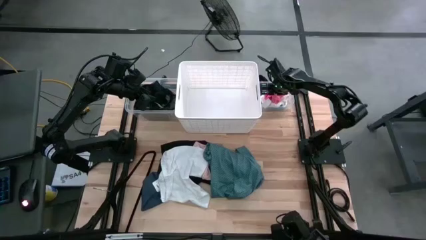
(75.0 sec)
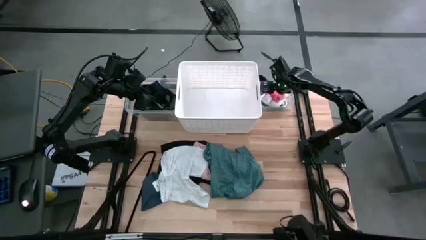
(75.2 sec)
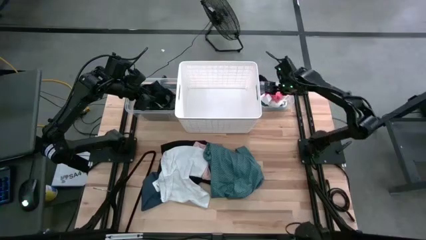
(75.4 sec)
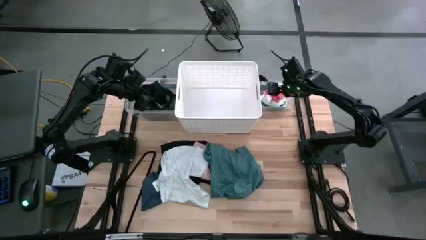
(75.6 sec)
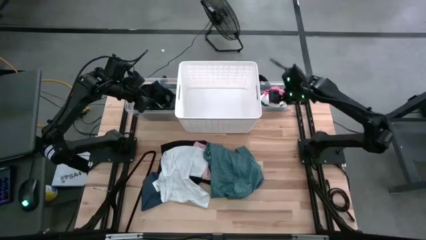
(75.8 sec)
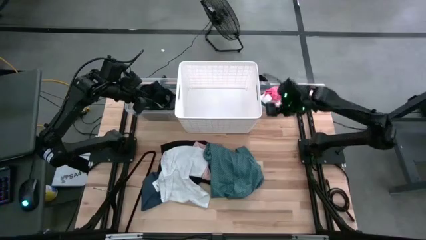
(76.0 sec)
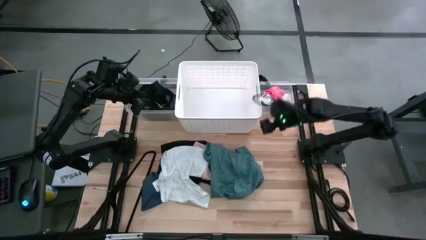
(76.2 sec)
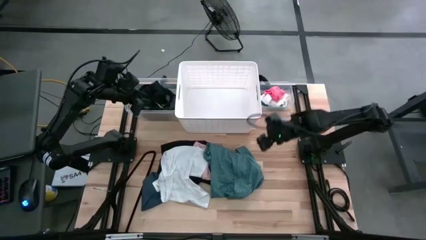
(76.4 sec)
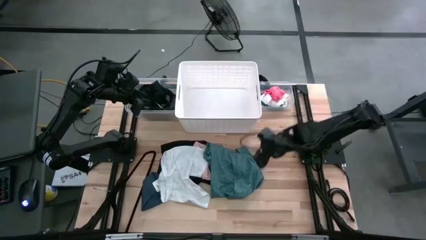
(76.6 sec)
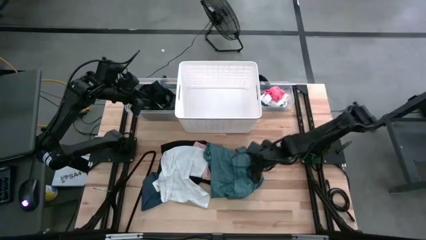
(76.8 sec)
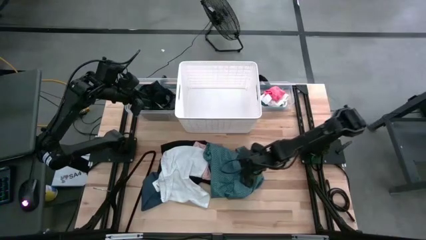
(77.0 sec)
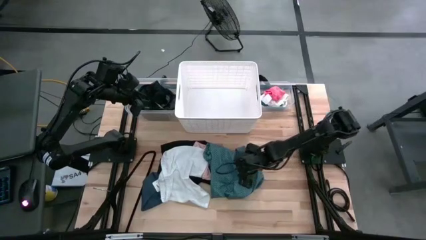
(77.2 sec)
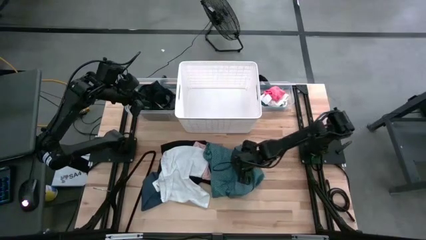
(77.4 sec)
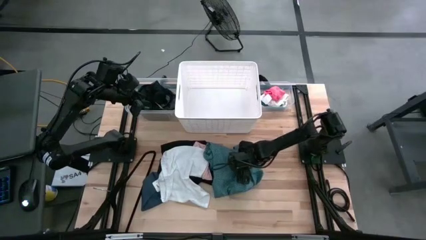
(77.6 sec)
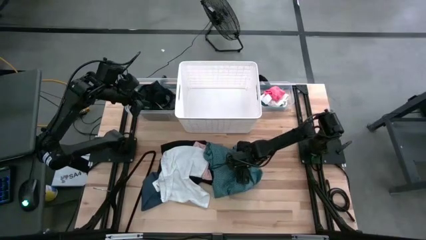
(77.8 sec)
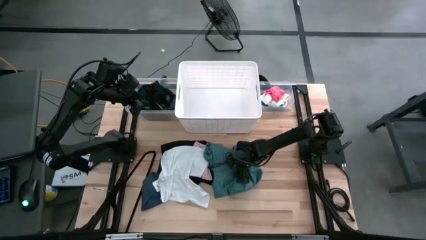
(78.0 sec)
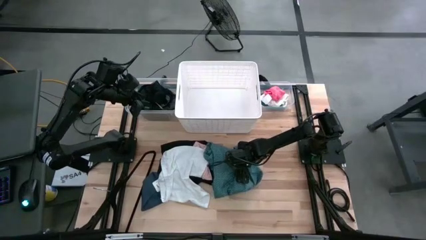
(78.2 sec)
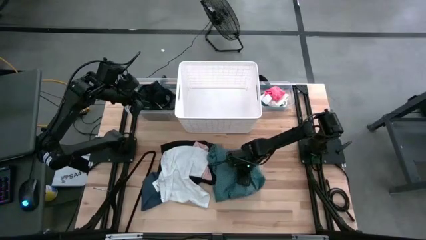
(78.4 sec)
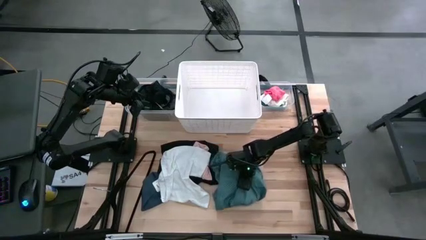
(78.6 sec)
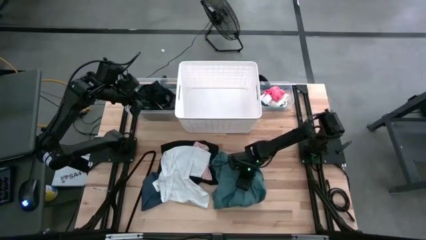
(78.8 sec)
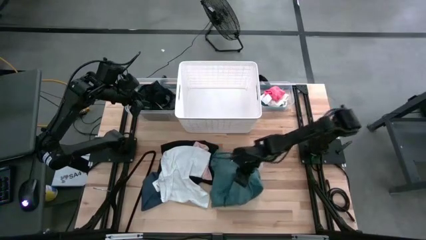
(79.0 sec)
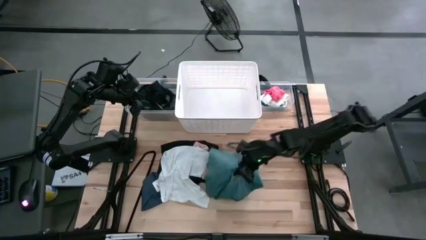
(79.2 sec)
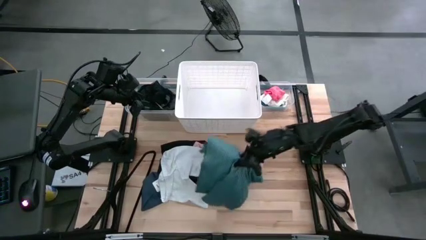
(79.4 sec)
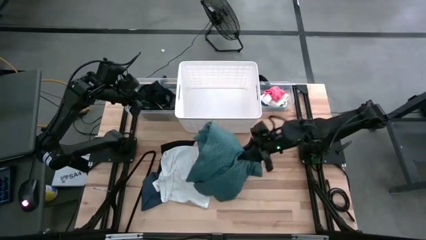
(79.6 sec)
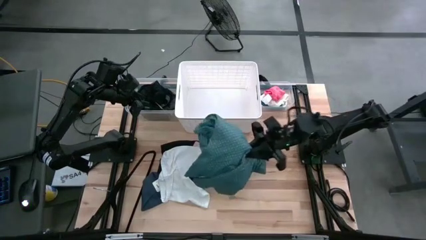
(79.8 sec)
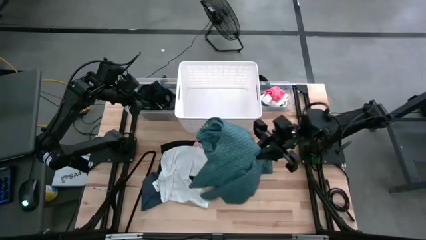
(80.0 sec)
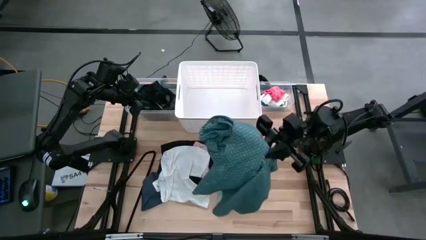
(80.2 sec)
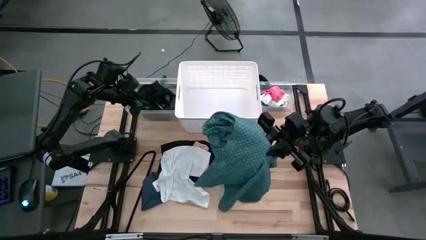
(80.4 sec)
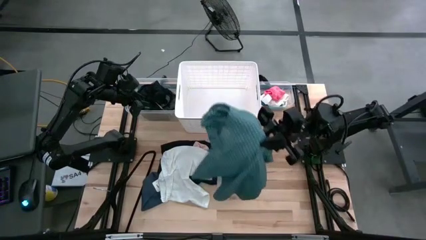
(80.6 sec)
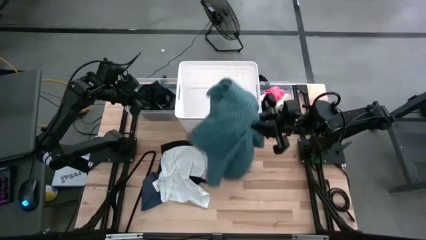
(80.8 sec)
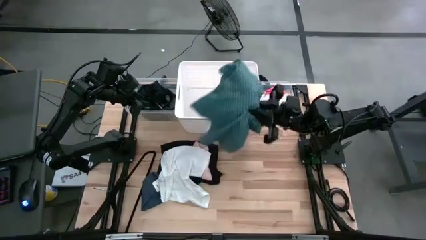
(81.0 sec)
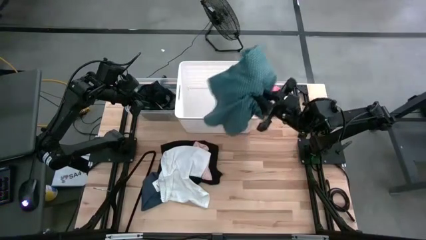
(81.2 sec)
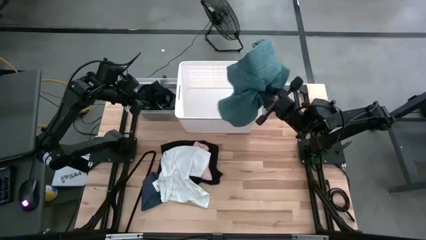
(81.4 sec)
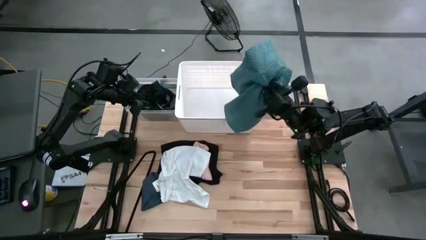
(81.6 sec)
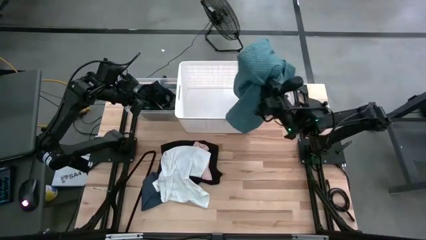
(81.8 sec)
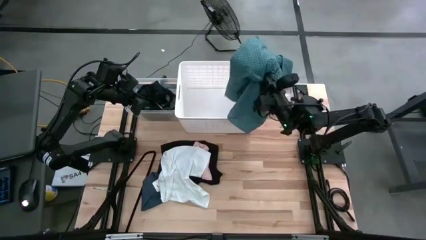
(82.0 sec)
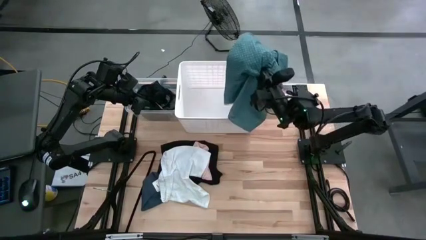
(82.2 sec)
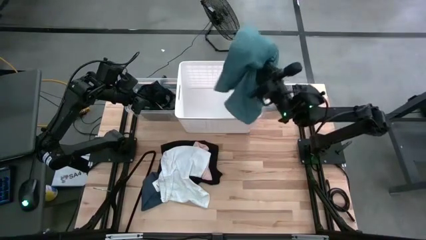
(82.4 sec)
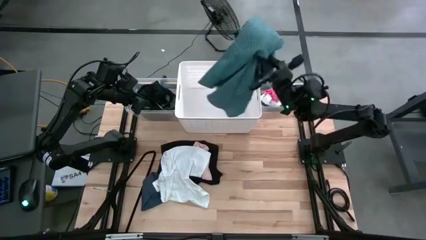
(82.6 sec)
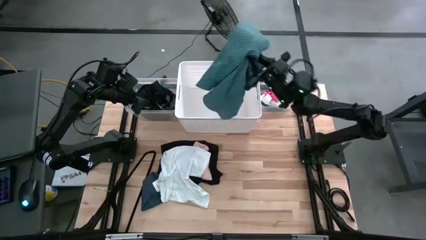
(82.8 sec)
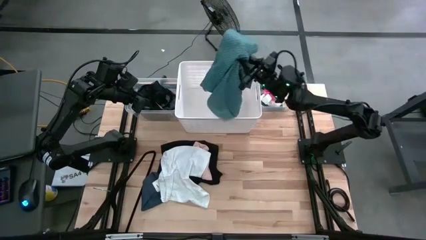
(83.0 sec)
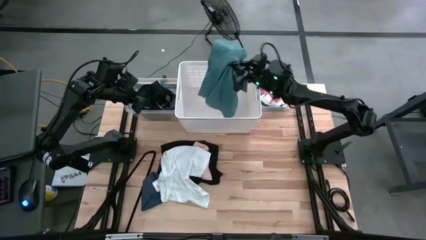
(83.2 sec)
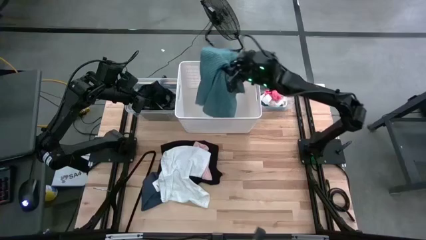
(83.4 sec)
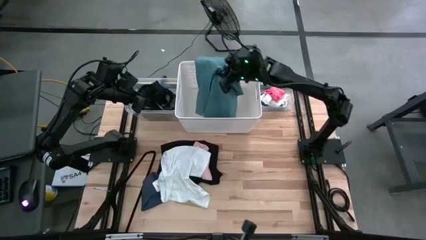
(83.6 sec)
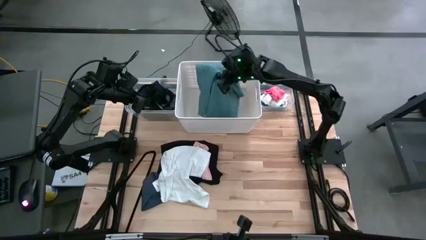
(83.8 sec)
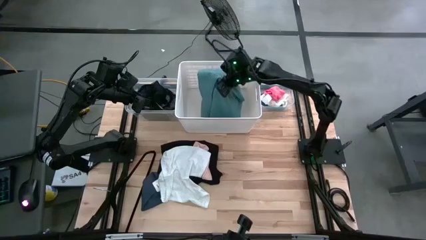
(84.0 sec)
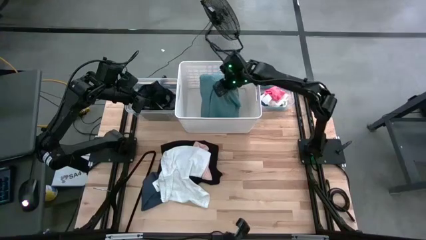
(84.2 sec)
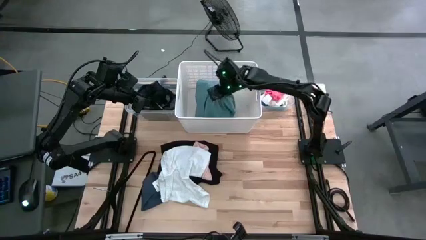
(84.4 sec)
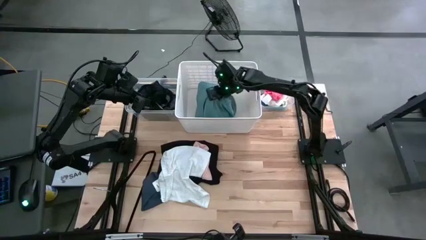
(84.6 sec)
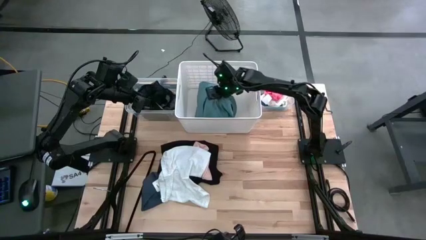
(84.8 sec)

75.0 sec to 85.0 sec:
Task: Pick & Place Cloths
Put the green shirt into the white bin

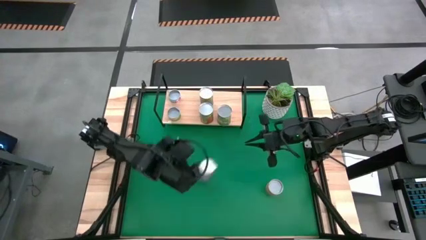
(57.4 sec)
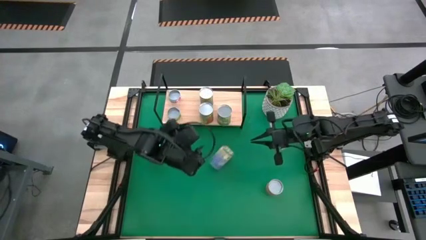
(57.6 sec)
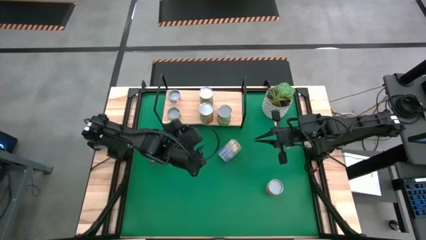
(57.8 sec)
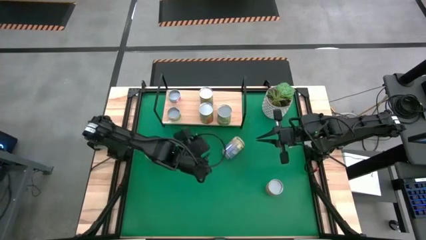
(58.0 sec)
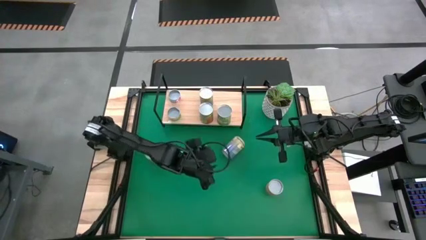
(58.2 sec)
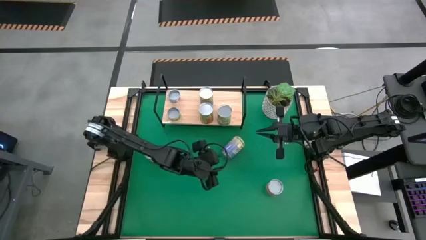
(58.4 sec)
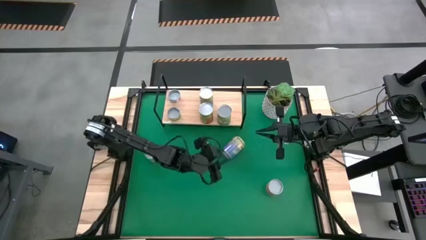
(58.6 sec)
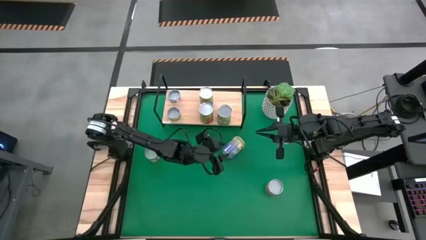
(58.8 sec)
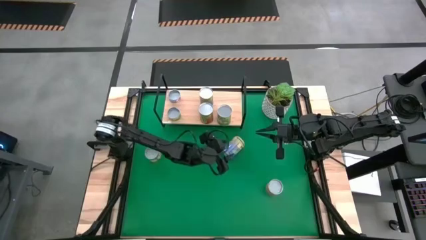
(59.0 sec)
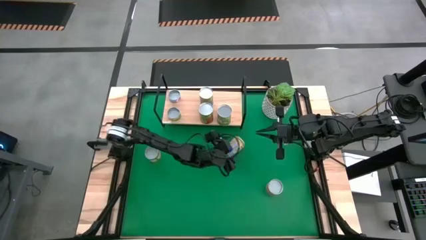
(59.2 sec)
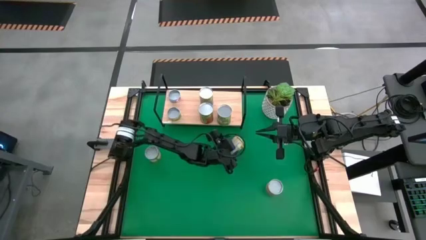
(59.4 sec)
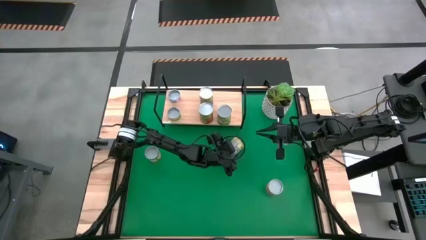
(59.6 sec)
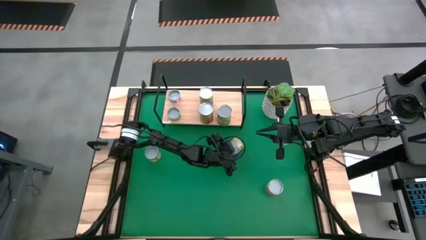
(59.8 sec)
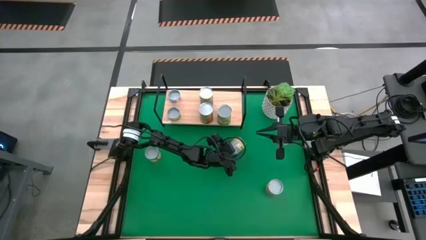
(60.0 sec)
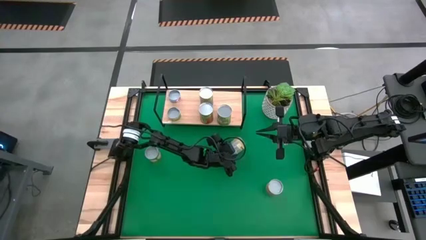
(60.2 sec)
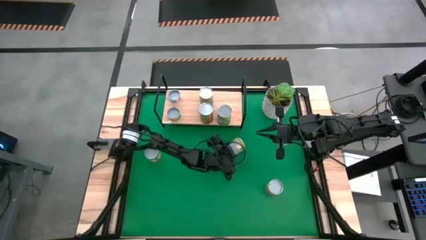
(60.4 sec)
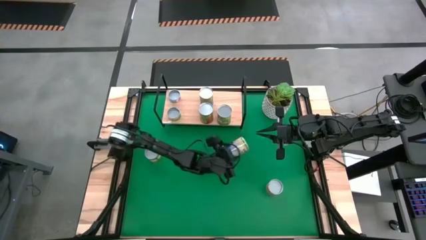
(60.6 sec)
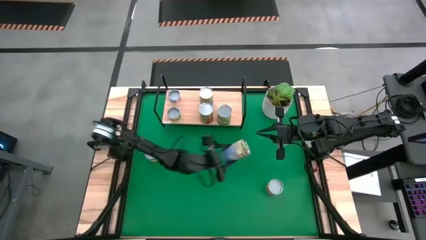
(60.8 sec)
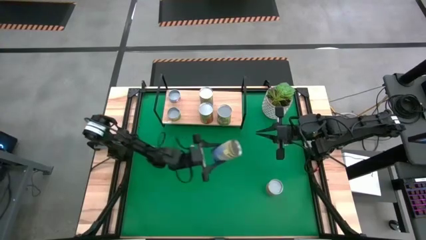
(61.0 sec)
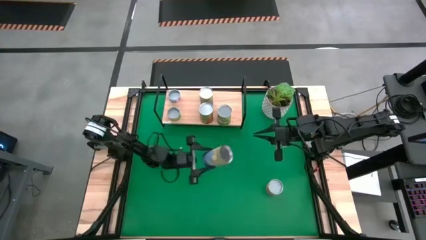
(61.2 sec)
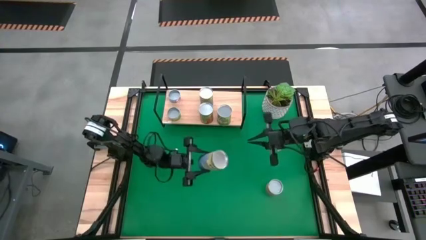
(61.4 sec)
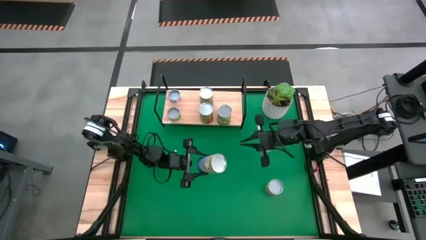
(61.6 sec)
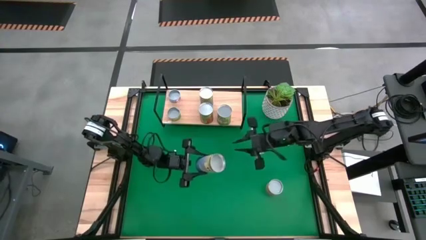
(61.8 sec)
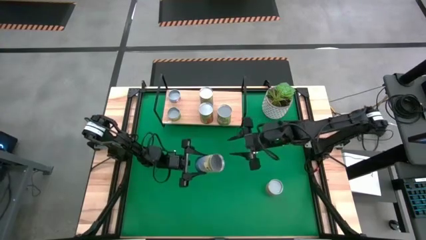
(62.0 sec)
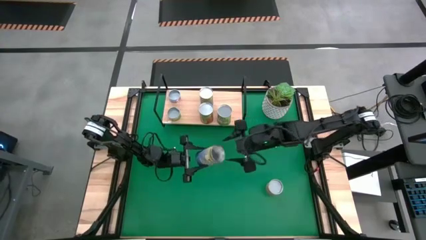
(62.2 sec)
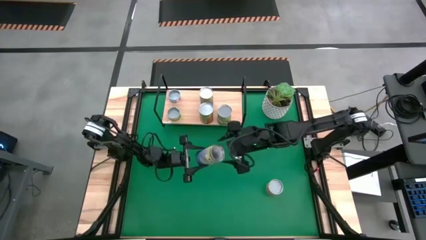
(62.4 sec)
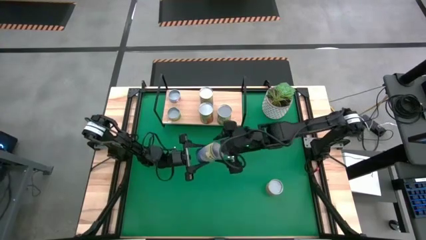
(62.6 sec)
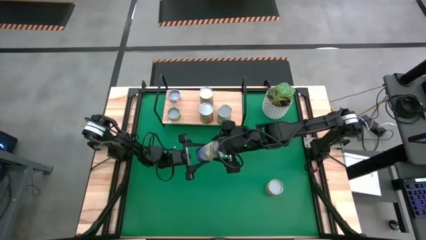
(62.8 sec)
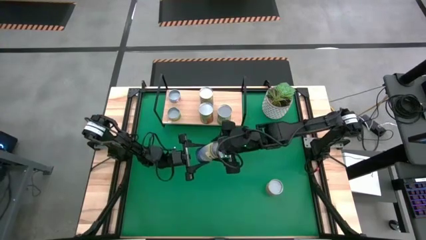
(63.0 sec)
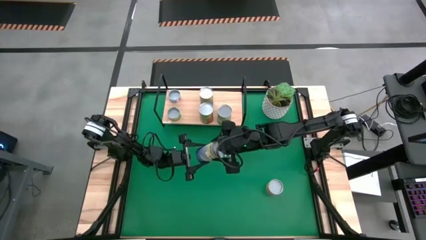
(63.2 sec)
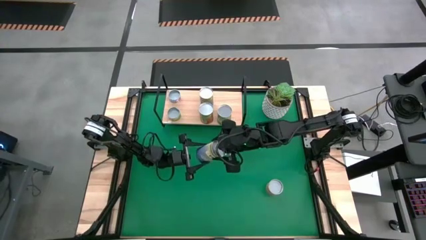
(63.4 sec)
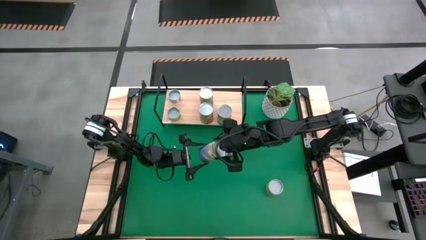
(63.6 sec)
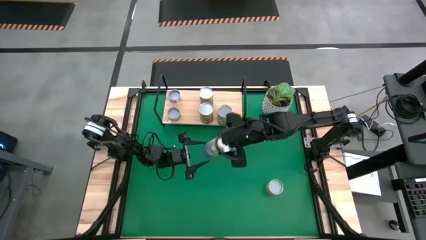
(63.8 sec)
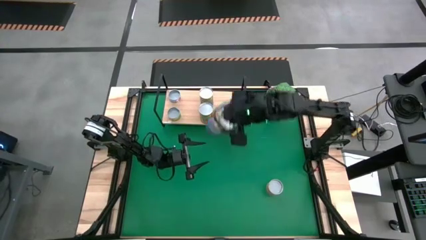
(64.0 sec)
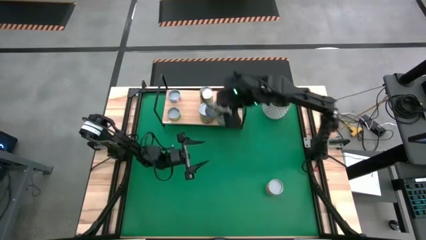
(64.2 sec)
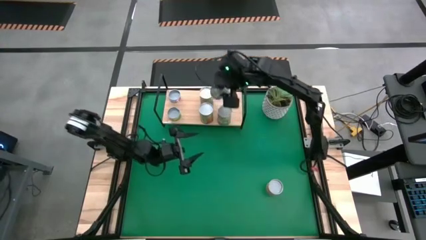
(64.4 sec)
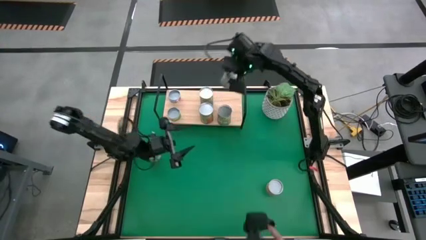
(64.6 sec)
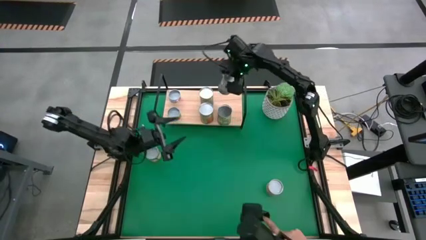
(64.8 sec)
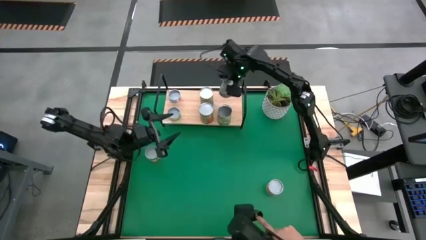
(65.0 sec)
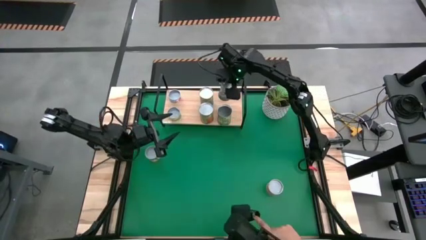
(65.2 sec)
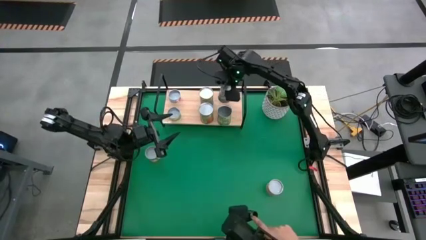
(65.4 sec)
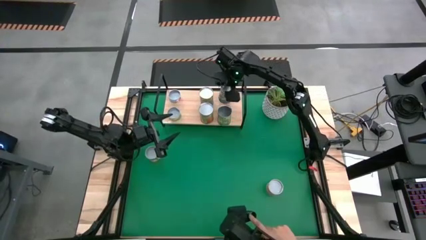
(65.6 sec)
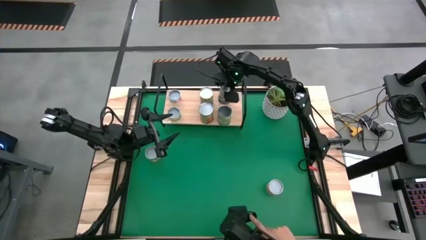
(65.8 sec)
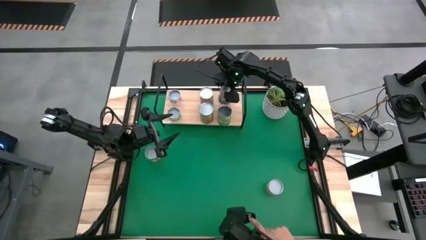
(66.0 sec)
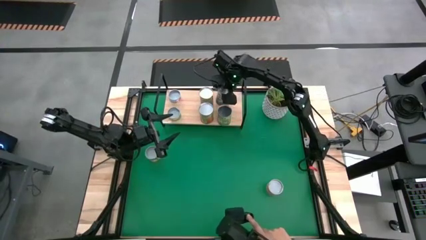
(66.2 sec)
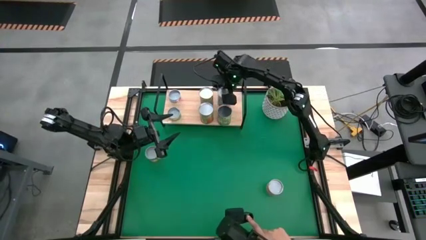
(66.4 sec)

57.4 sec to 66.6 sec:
Task: Pick and place cans onto a shelf
Put the canned peas on the shelf
